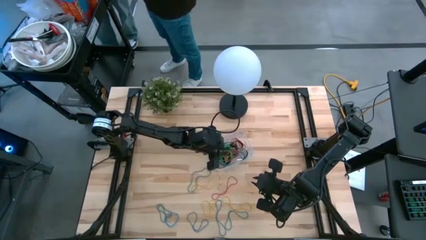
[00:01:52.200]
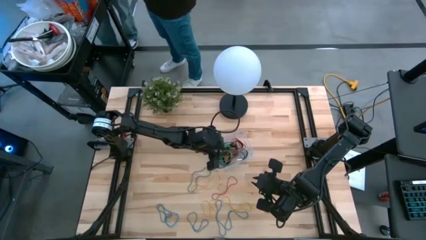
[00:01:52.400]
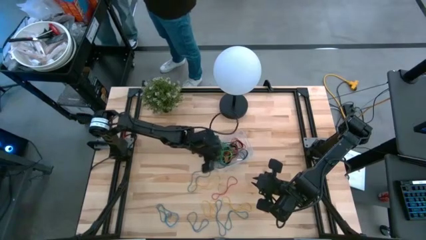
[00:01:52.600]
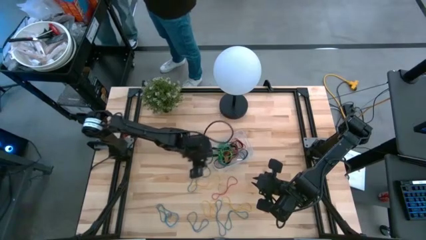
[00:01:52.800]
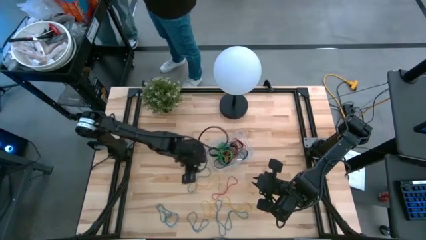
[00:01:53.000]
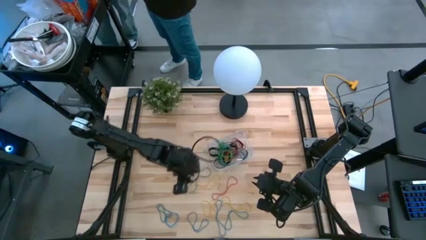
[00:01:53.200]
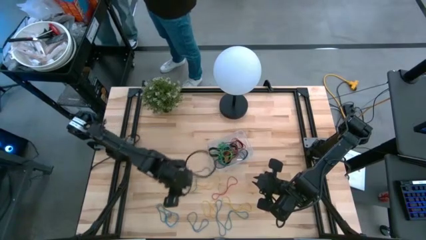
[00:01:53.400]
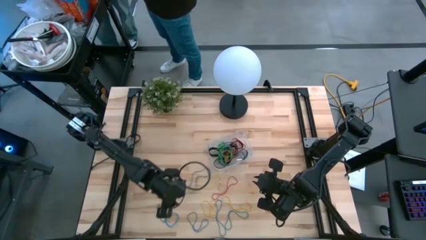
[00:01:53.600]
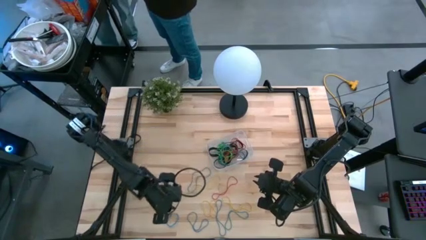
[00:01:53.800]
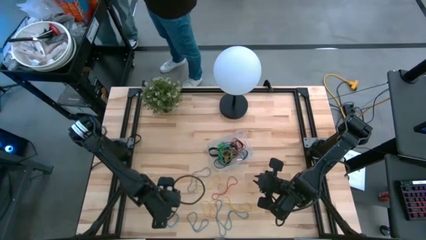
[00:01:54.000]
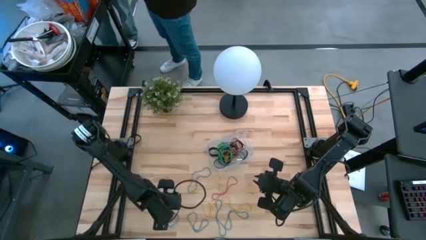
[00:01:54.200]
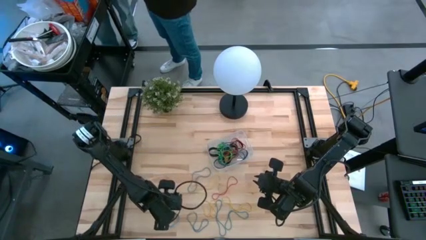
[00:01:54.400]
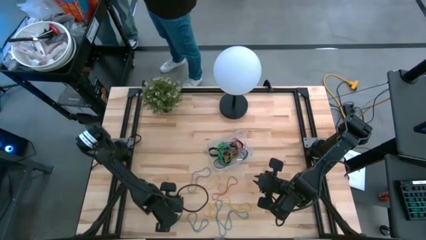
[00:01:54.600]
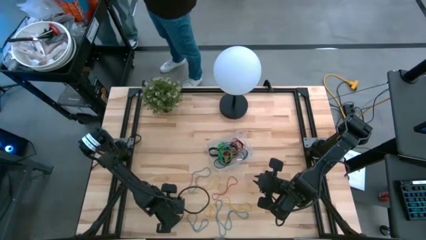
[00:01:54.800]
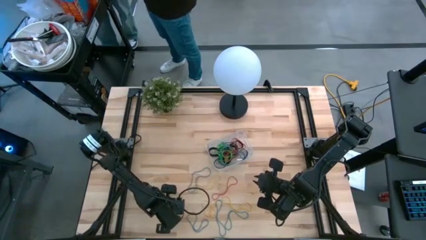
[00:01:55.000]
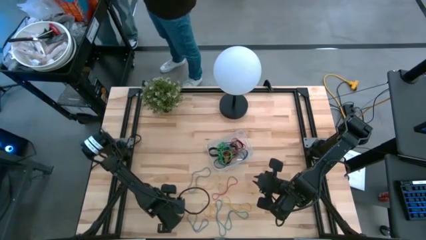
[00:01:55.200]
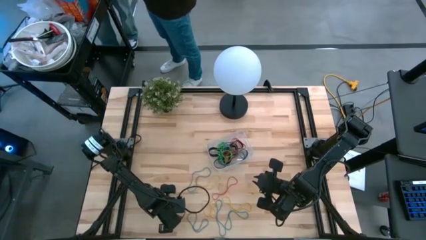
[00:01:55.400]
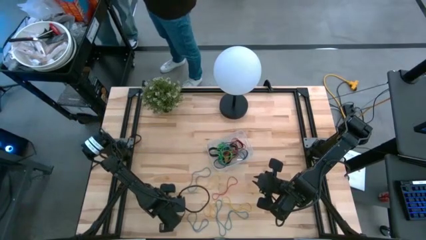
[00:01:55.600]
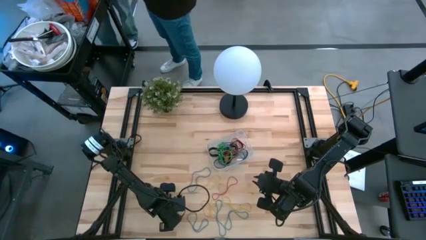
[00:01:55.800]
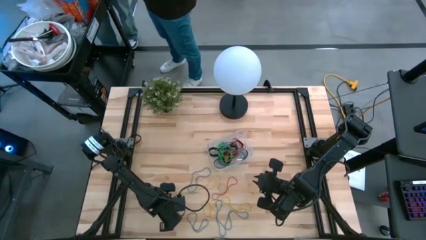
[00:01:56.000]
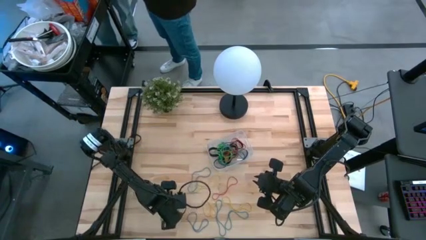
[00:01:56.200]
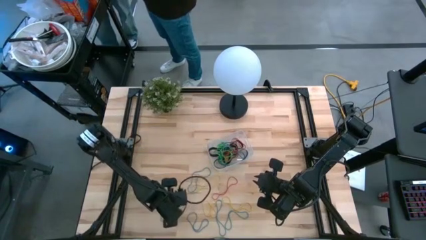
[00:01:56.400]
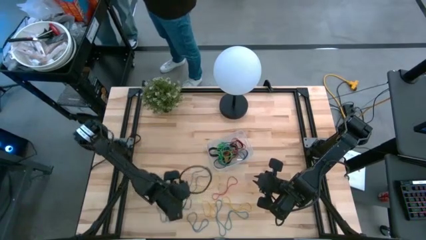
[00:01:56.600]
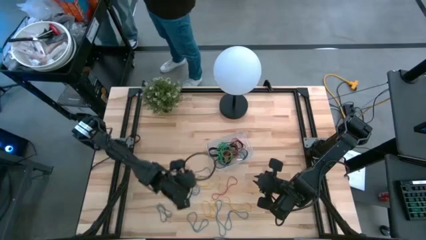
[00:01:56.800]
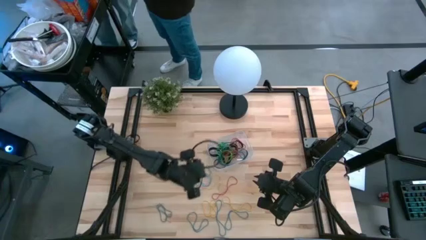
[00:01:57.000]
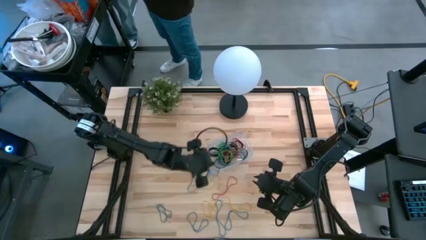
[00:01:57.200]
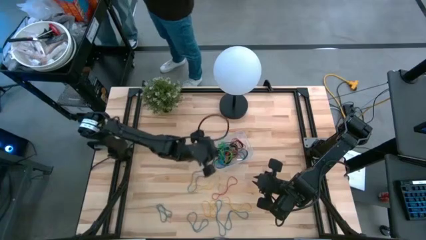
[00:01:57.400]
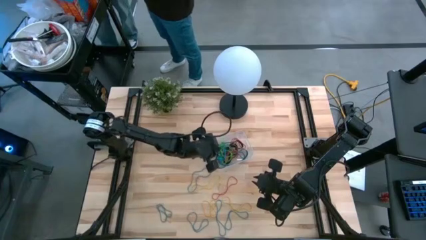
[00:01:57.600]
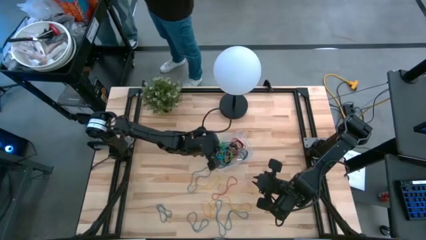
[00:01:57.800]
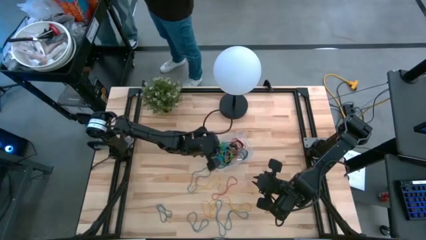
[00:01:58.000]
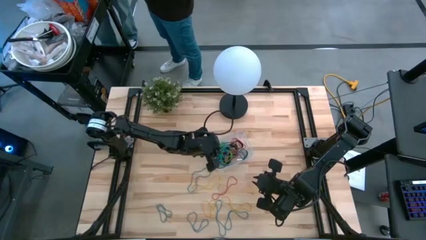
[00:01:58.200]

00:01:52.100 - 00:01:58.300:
Task: Pick and place rubber bands into bin
Put the blue rubber band into the transparent bin

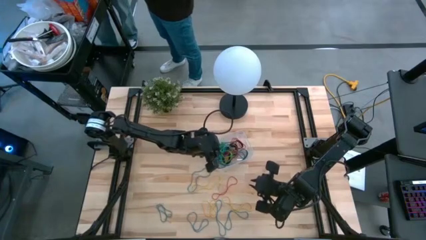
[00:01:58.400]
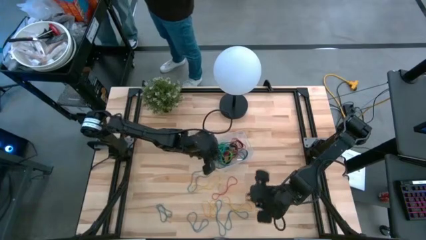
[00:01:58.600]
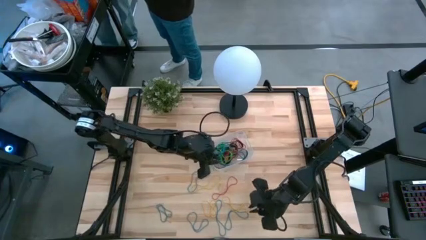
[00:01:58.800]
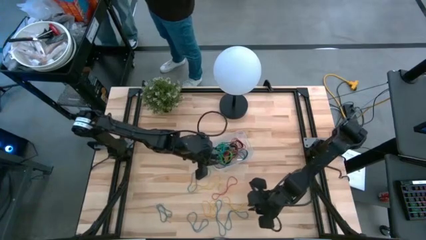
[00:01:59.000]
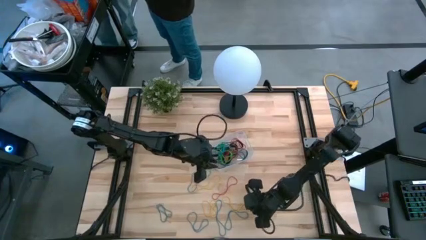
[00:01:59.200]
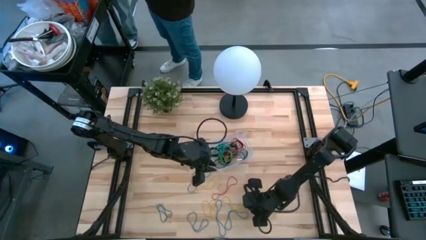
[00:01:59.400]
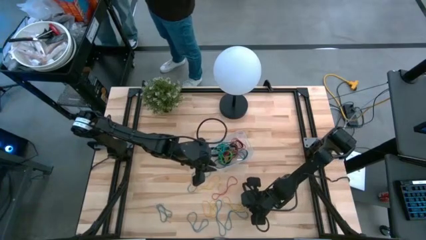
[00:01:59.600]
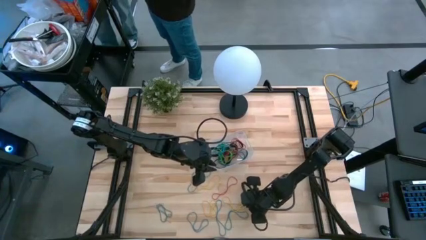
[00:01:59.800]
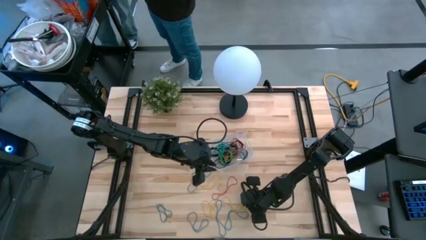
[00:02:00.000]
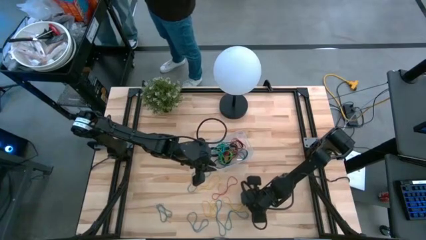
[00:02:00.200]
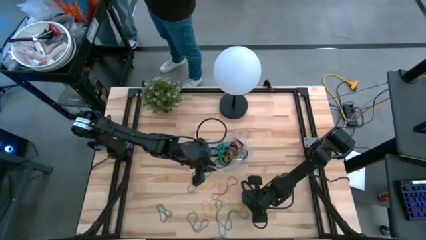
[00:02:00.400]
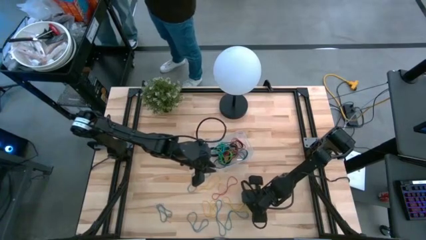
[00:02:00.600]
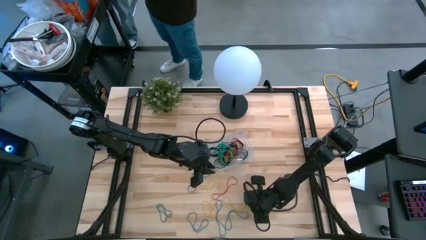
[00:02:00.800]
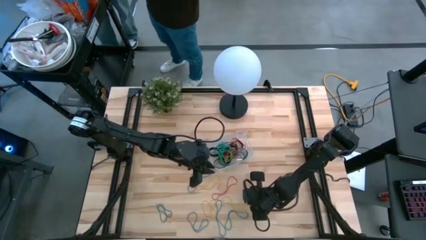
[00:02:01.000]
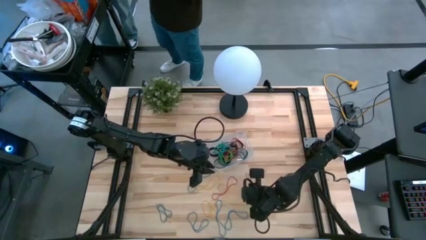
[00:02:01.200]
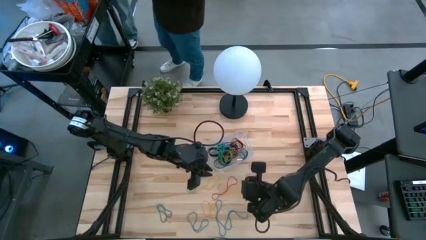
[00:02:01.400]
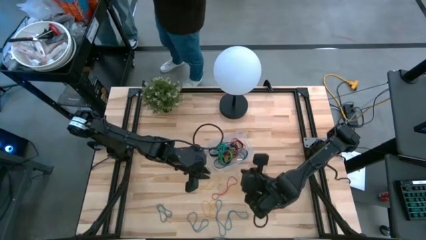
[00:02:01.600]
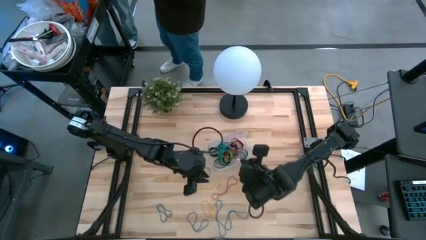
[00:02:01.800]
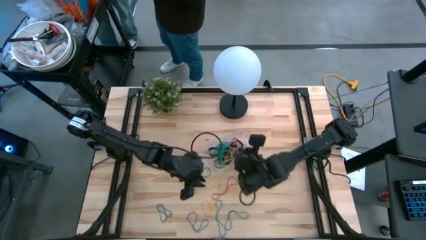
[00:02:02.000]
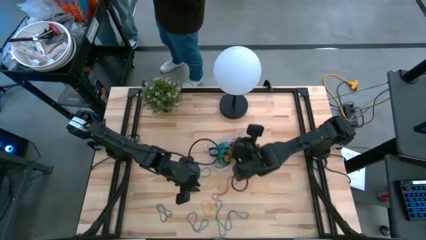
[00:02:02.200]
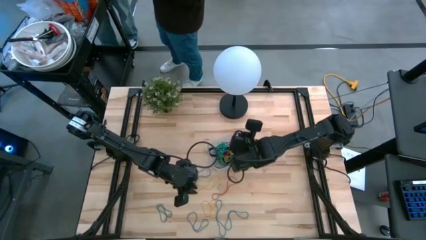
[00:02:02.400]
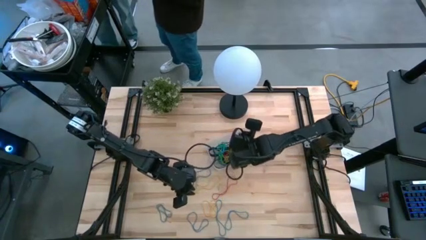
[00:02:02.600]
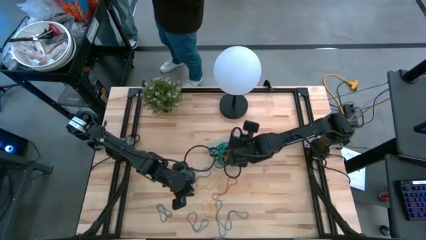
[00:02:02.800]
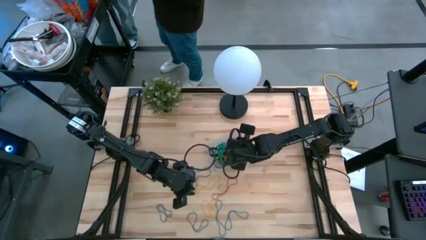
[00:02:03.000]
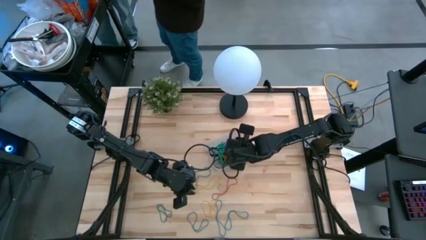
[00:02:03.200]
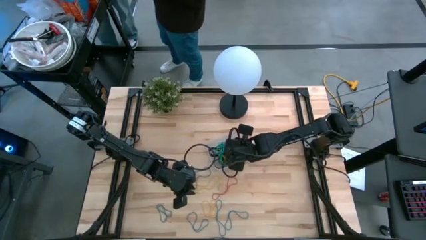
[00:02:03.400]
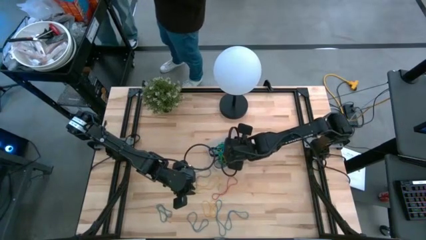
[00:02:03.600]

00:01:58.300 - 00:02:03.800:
Put the yellow rubber band into the transparent bin

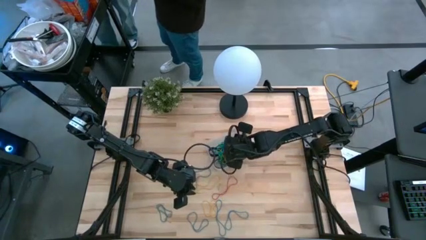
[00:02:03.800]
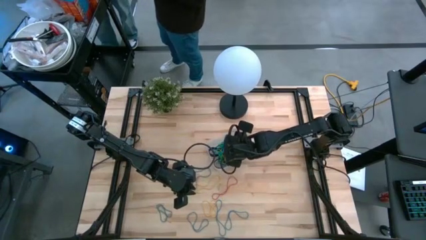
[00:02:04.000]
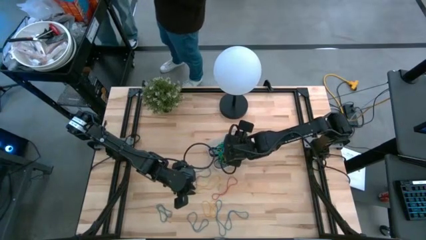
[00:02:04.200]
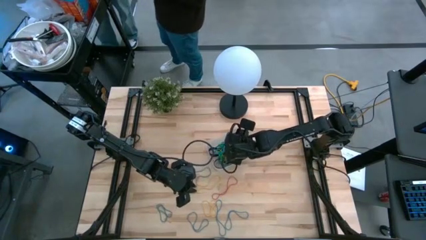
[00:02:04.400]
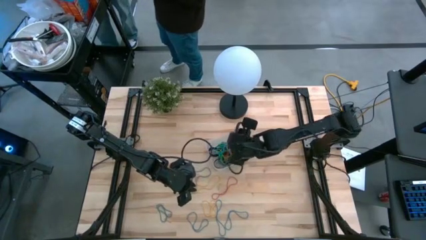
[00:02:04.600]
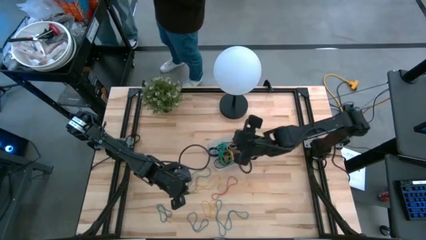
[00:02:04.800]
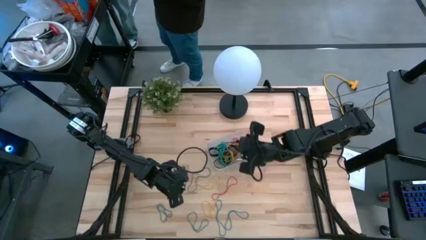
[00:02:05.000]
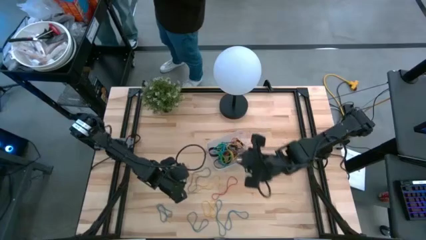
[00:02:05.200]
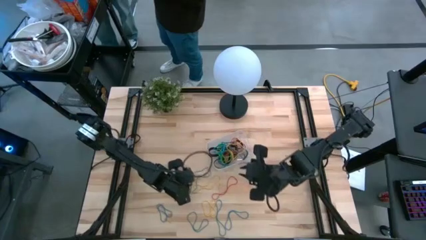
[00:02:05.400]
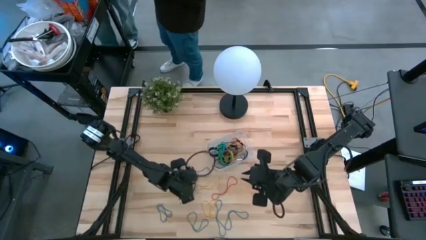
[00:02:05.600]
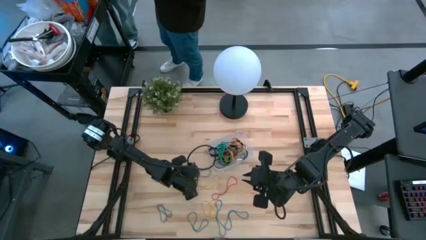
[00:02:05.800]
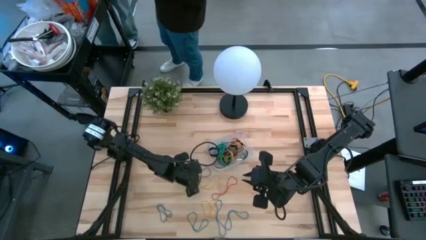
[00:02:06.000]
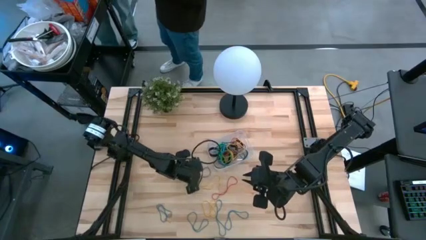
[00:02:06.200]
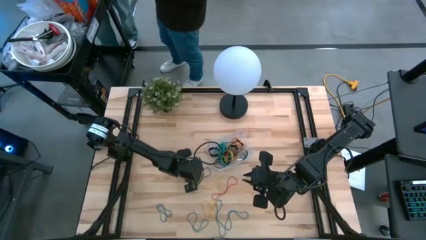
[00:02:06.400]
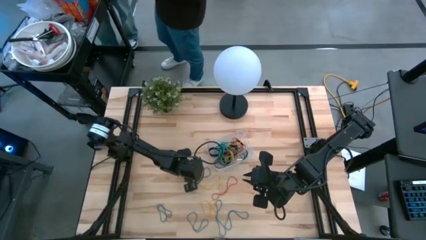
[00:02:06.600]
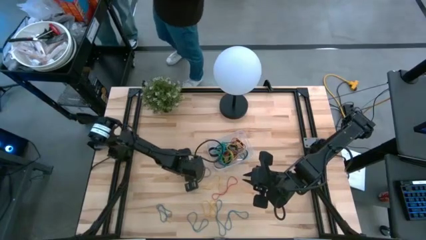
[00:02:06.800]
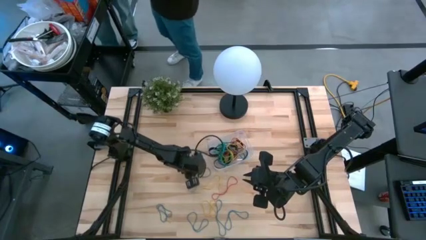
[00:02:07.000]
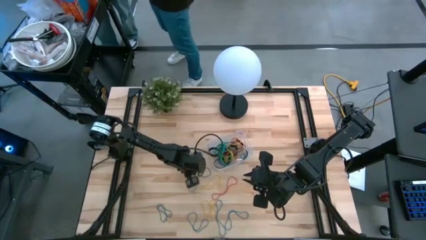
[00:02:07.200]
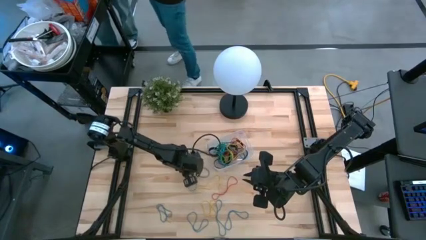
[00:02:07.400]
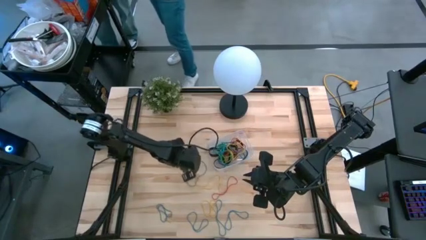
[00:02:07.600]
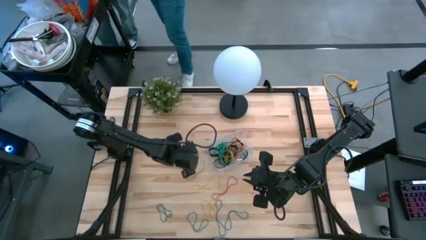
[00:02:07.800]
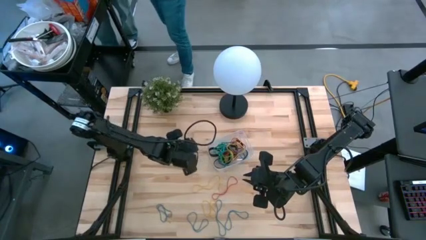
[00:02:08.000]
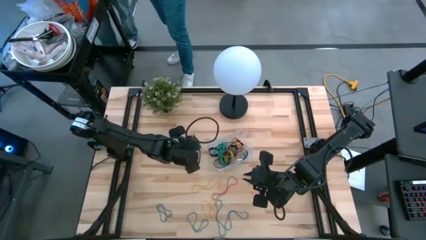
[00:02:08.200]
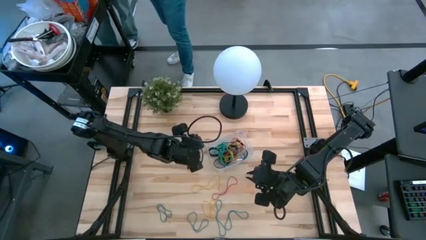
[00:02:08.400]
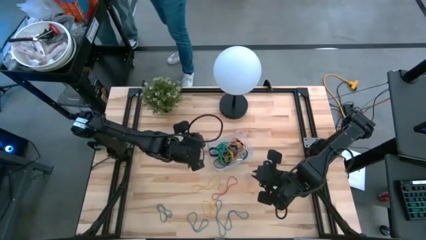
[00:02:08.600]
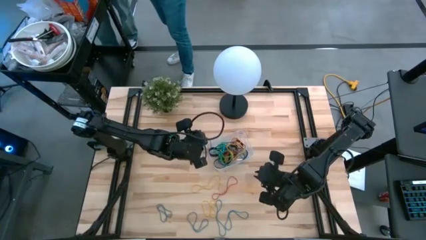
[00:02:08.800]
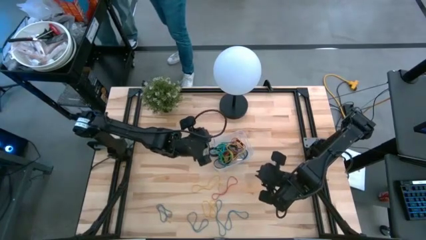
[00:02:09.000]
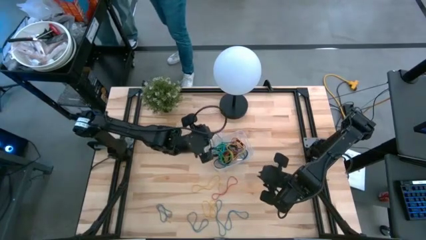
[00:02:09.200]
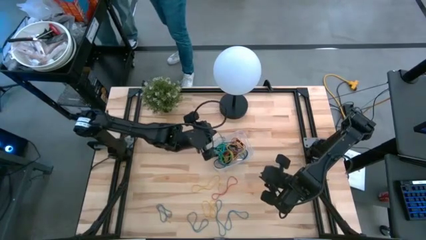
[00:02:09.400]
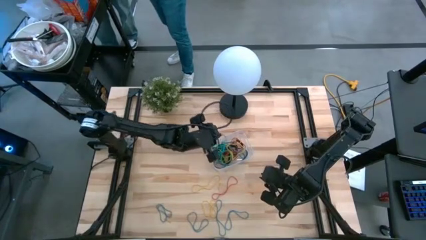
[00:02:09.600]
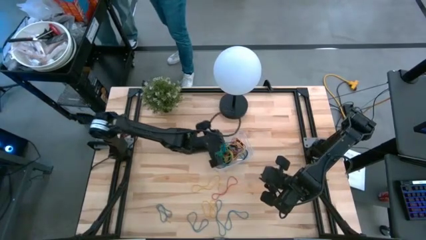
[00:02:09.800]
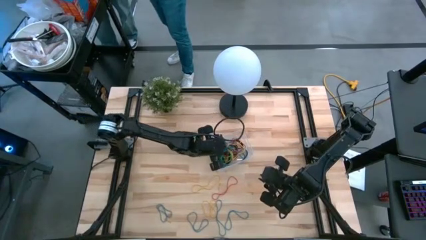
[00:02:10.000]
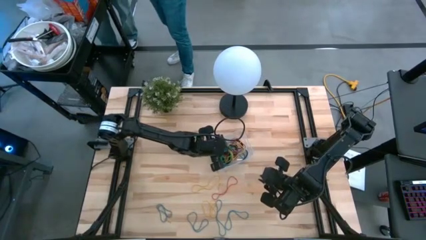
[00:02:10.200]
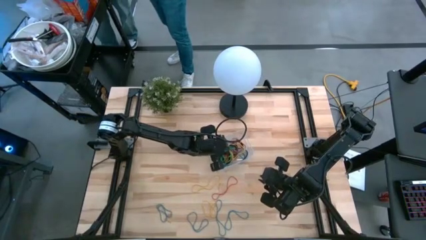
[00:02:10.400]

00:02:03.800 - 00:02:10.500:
Put the blue rubber band into the transparent bin
